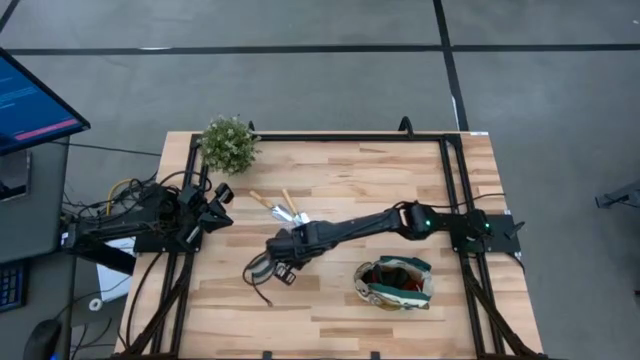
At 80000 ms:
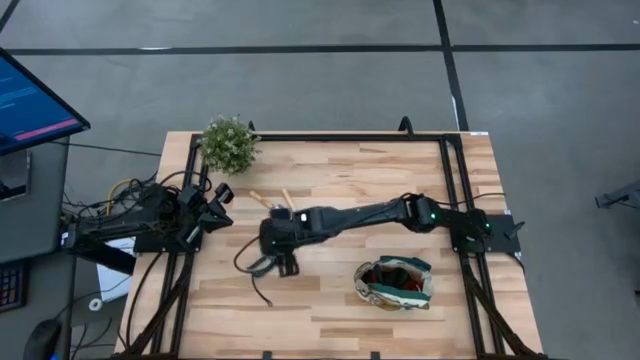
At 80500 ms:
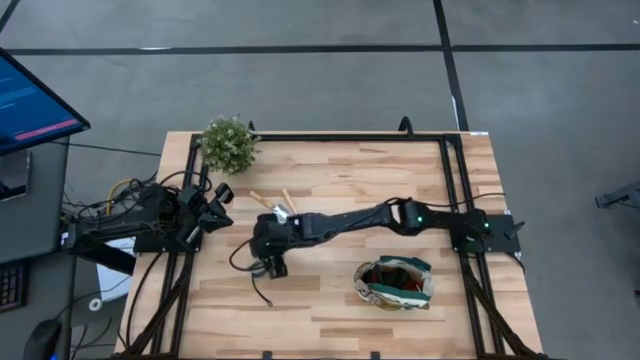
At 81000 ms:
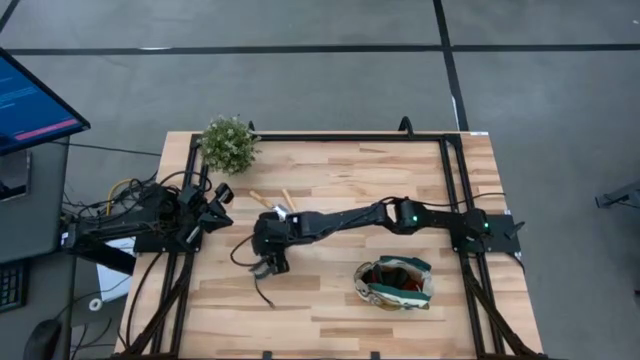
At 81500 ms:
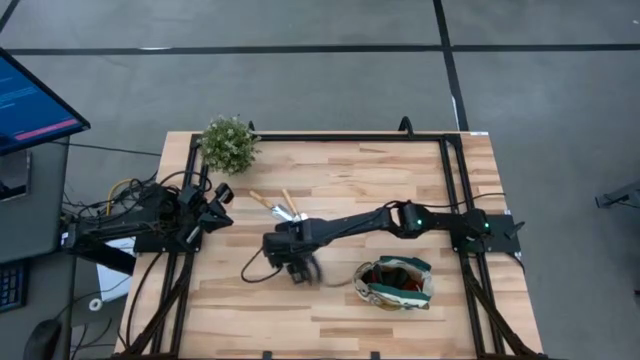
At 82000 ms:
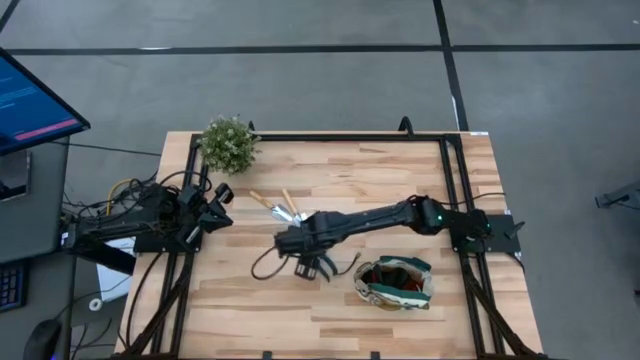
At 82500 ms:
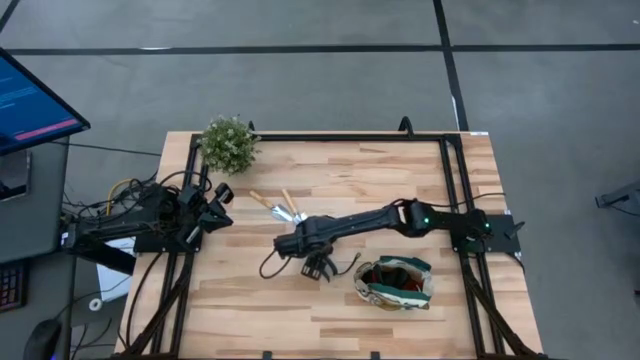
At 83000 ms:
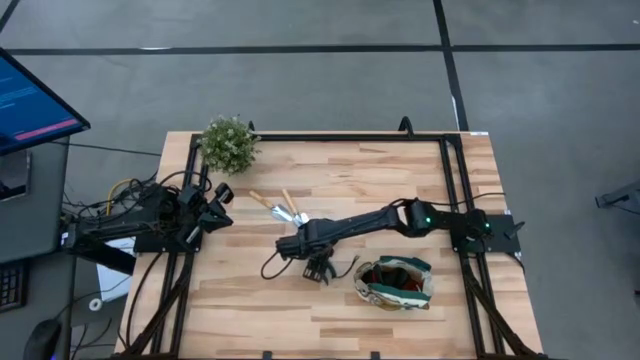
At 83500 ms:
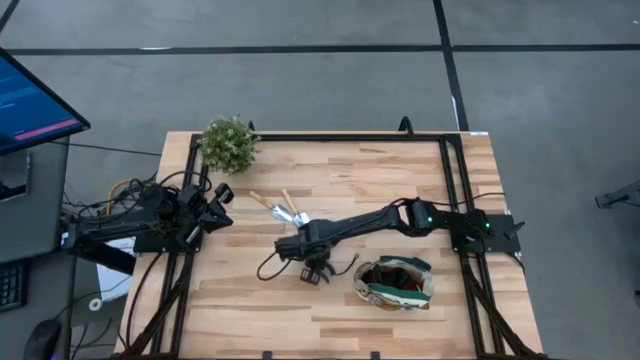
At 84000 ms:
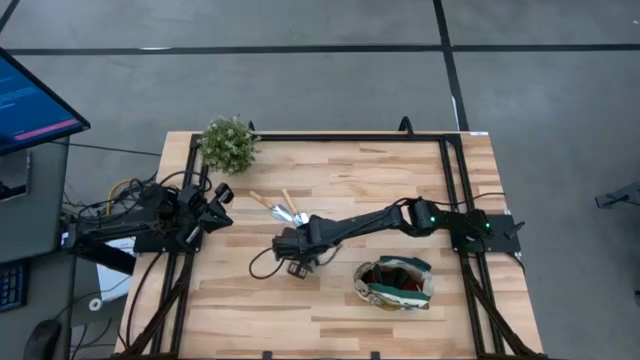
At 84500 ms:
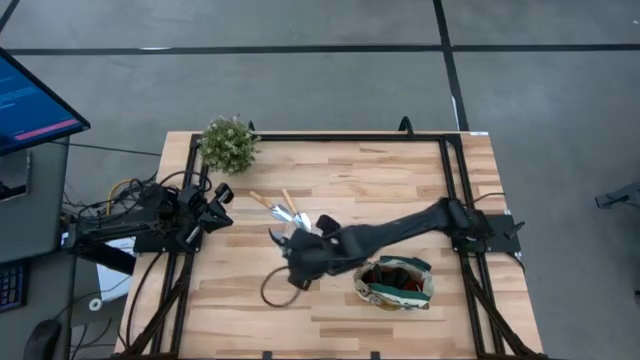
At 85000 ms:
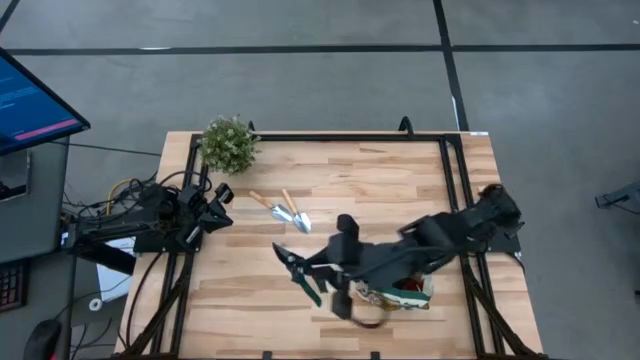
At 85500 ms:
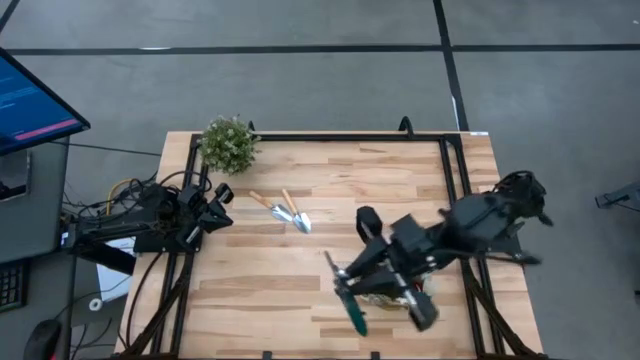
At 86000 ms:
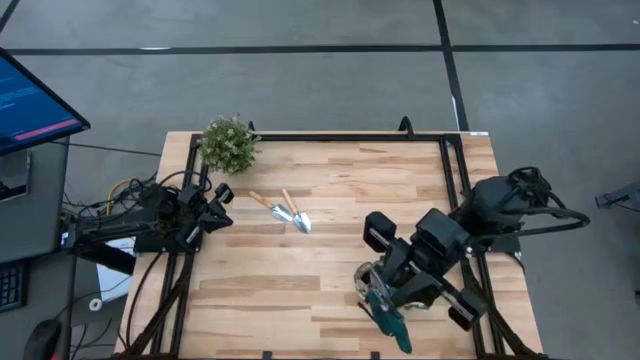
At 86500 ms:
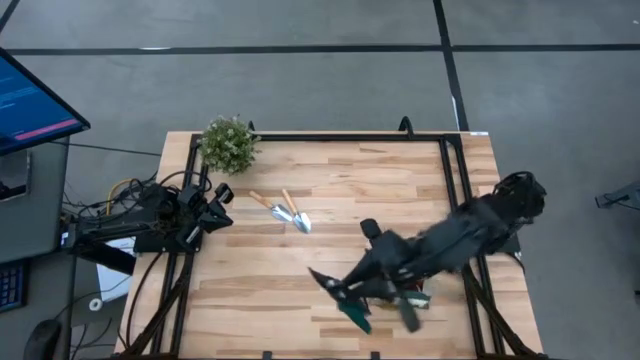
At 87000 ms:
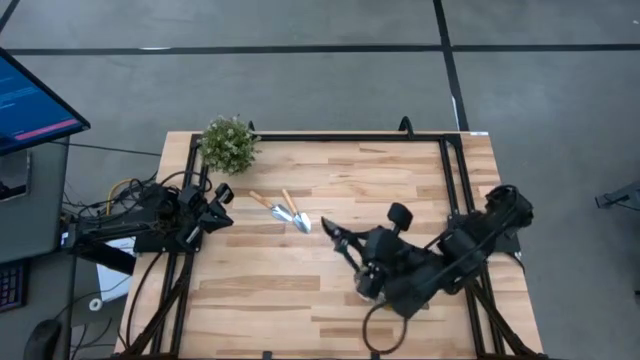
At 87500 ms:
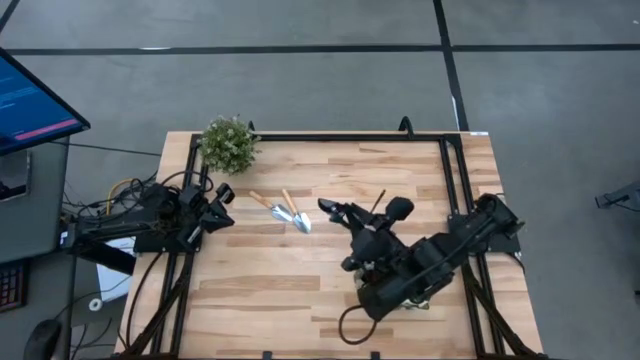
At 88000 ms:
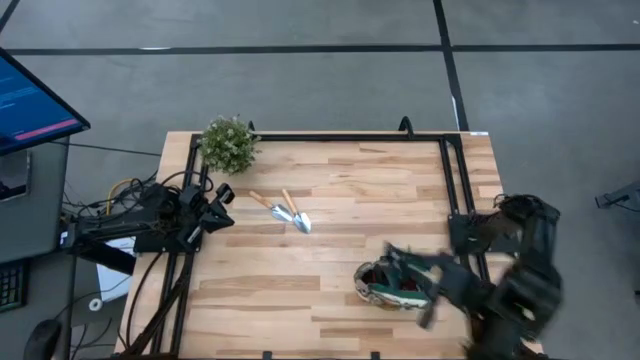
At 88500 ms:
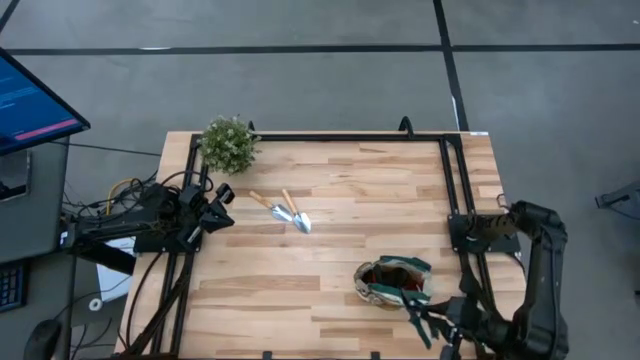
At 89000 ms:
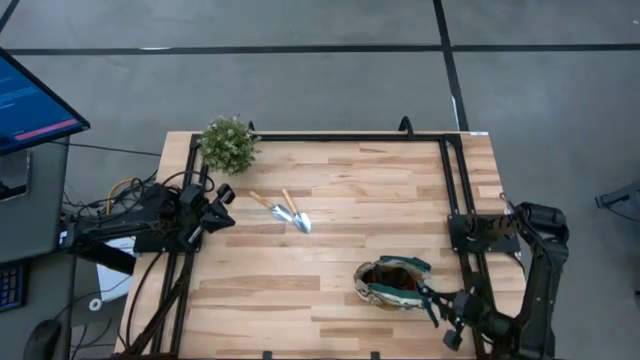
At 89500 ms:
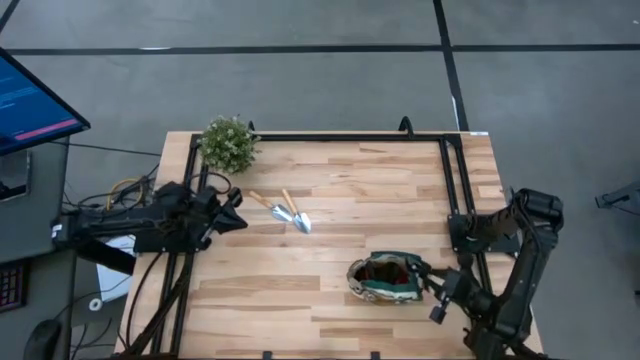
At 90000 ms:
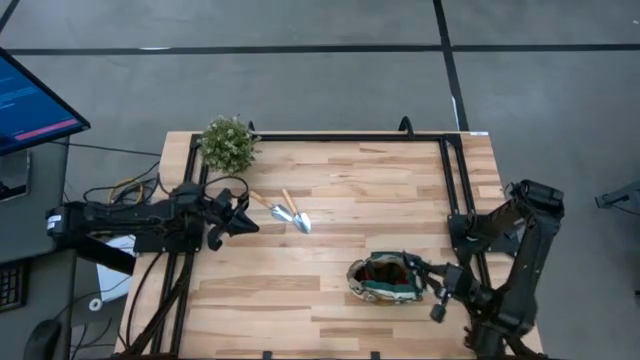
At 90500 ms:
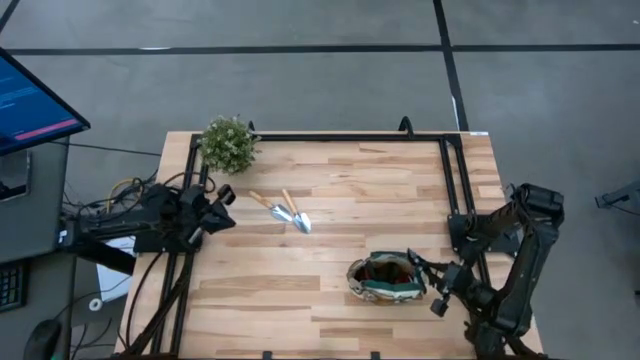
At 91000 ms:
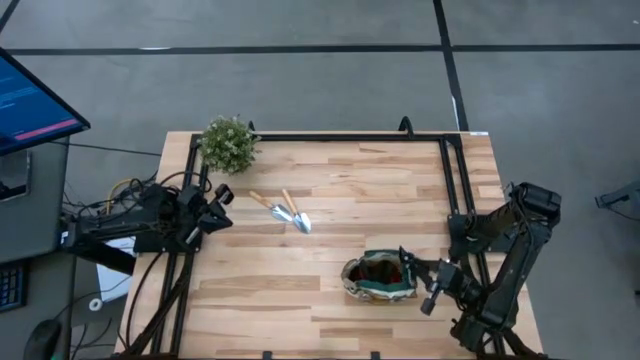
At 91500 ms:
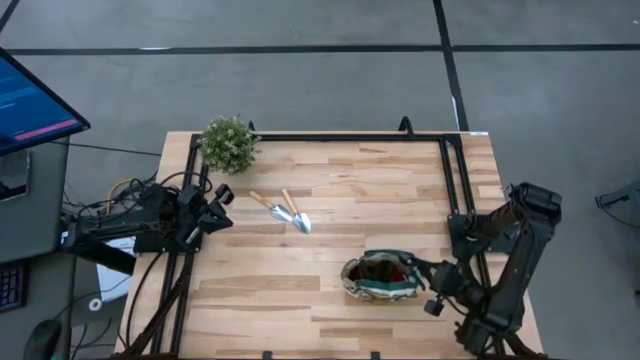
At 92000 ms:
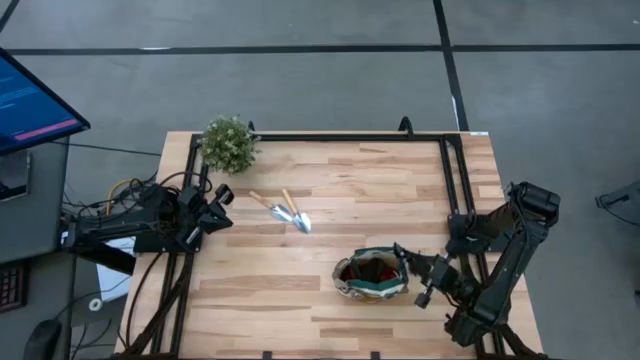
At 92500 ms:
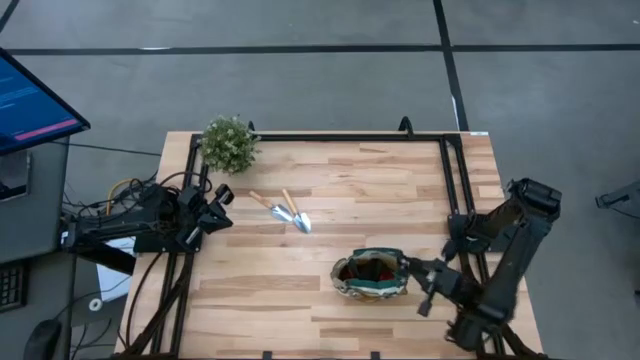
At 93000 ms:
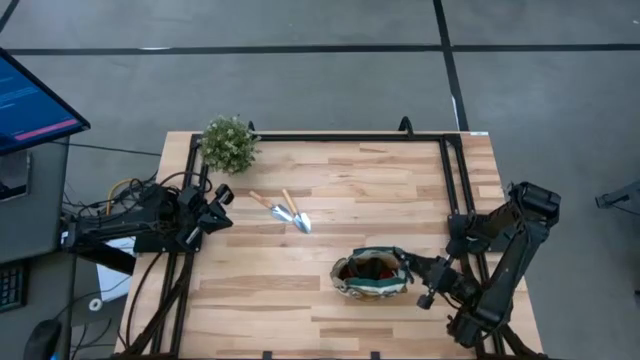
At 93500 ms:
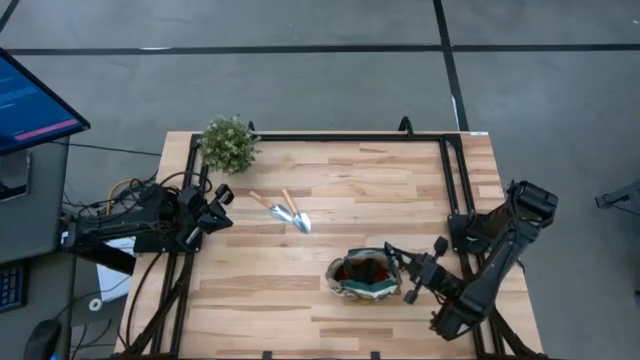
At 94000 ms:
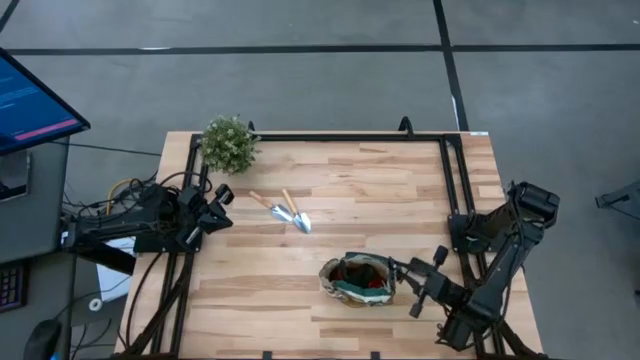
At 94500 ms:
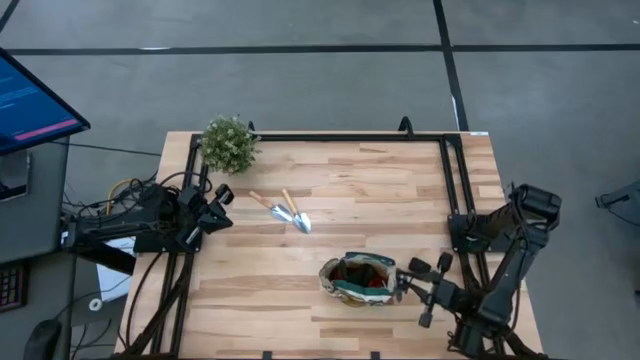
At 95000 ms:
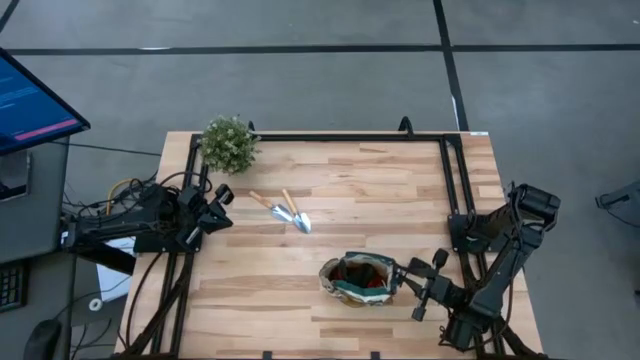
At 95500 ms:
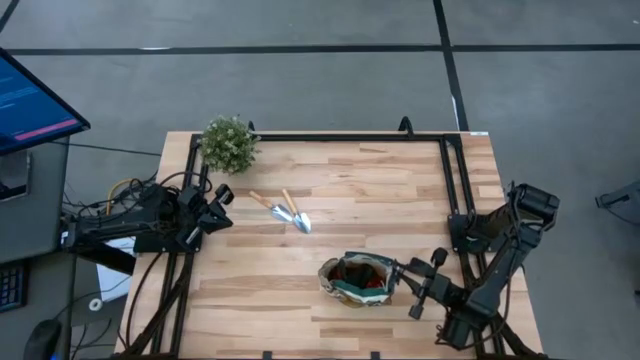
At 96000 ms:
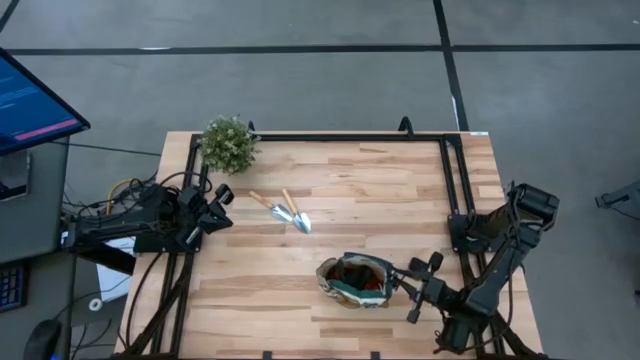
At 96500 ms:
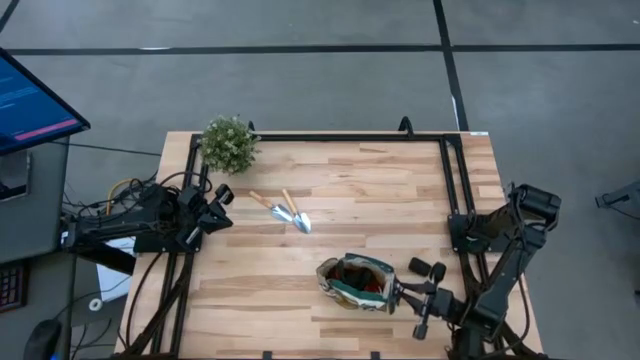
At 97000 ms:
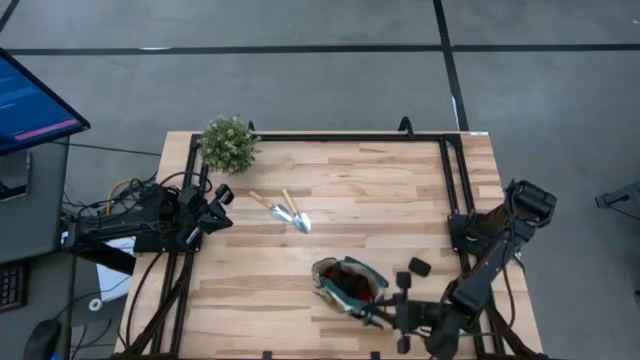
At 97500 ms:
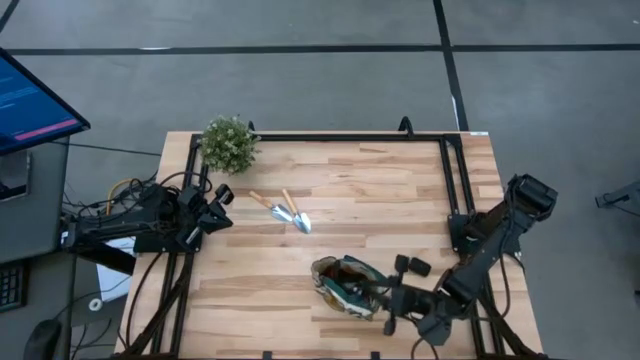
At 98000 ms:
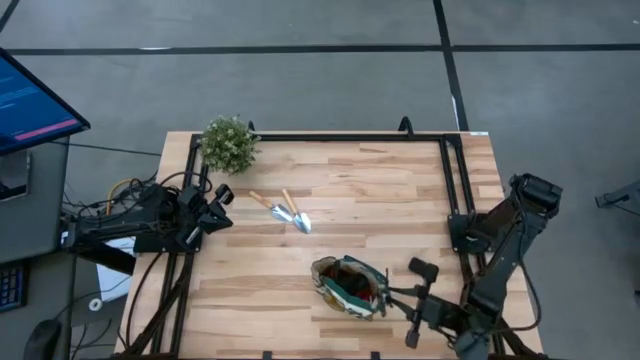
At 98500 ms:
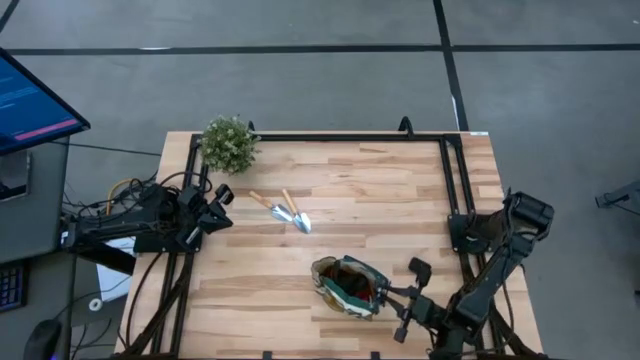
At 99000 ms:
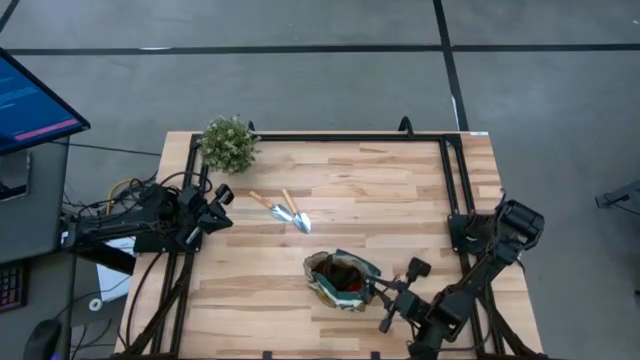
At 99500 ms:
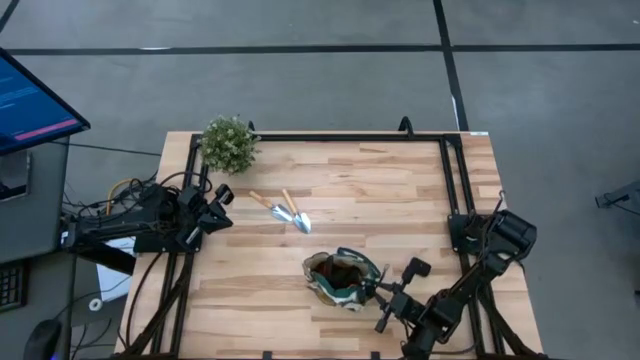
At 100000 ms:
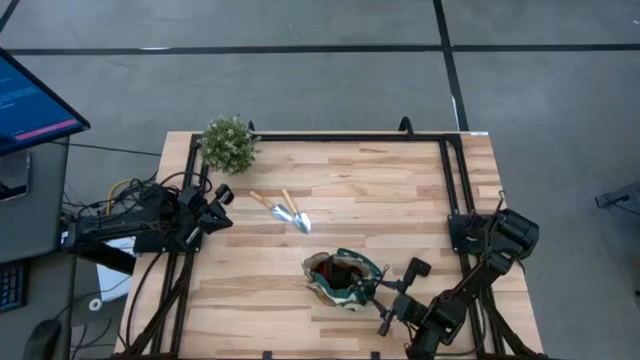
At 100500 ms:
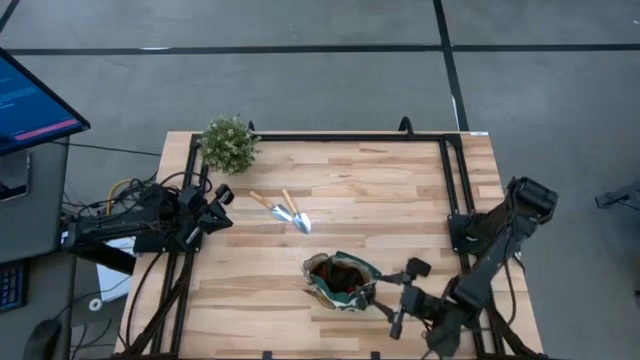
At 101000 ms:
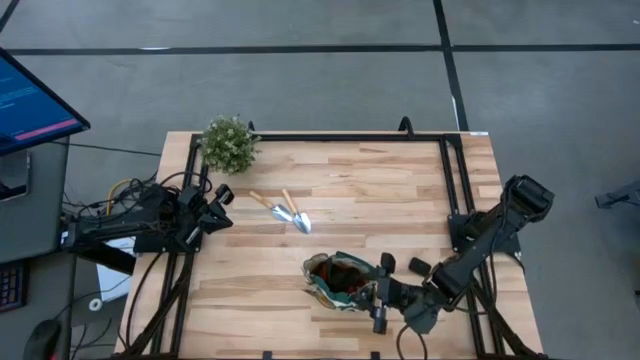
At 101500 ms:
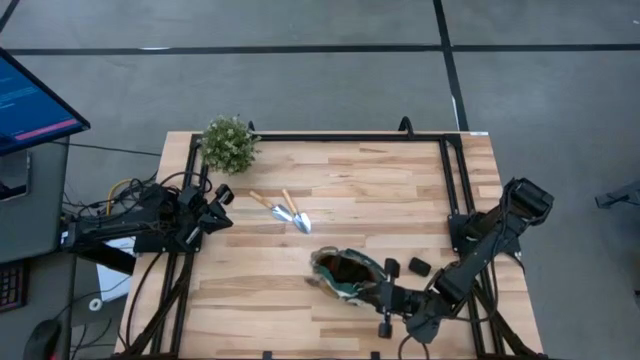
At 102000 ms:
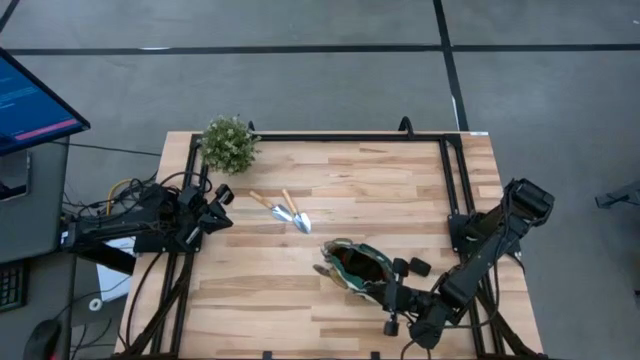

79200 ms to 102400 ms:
Task: Pick & Place Garden tools in Gardening bag
Put the green shear scissors into the yellow gardening bag
